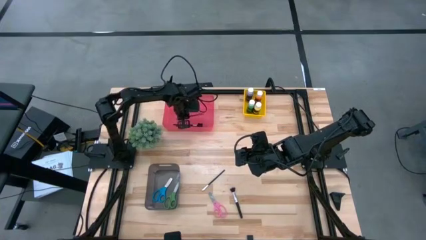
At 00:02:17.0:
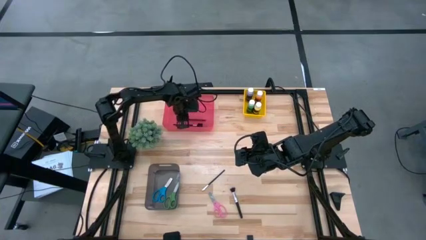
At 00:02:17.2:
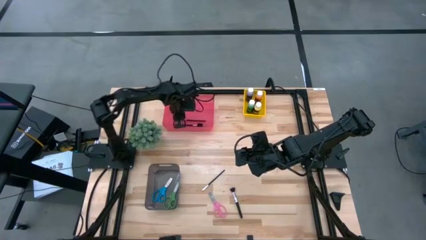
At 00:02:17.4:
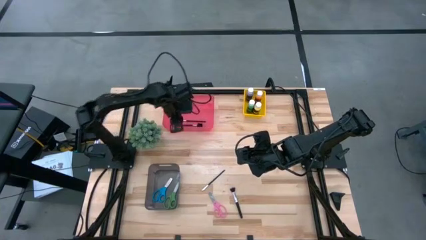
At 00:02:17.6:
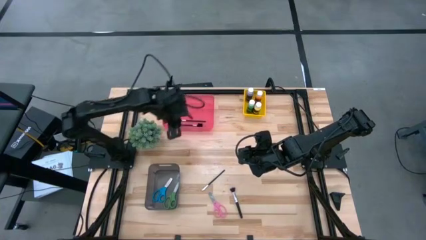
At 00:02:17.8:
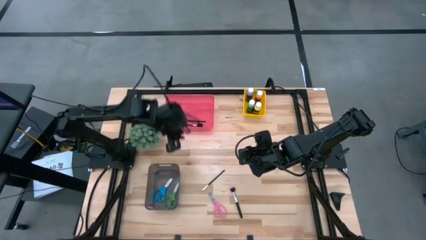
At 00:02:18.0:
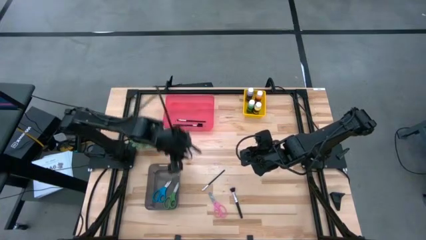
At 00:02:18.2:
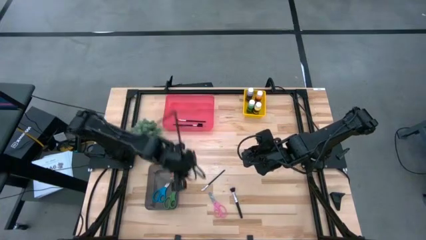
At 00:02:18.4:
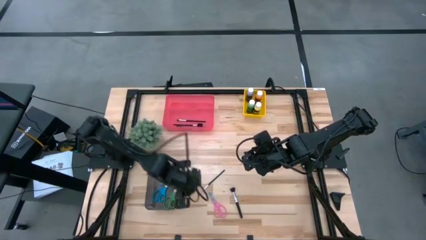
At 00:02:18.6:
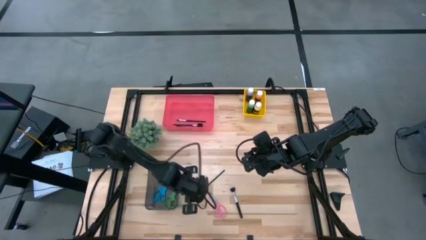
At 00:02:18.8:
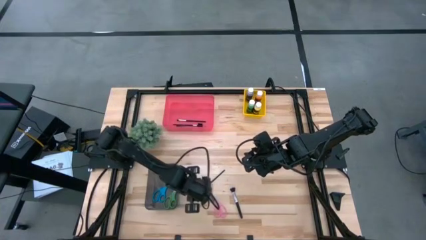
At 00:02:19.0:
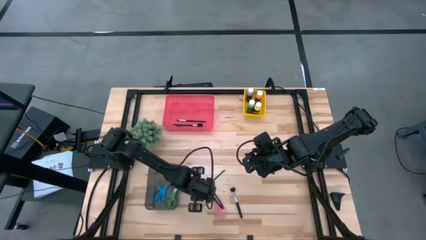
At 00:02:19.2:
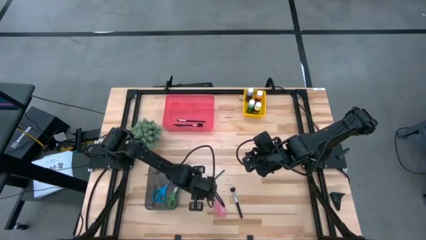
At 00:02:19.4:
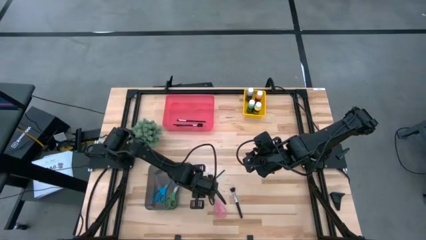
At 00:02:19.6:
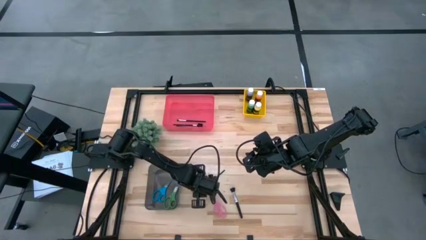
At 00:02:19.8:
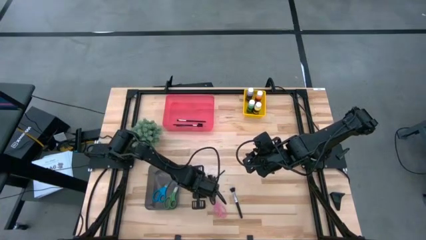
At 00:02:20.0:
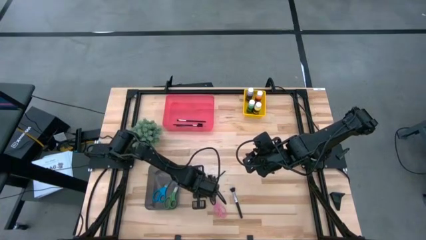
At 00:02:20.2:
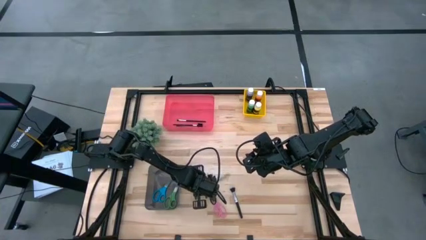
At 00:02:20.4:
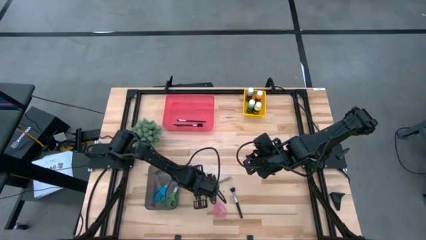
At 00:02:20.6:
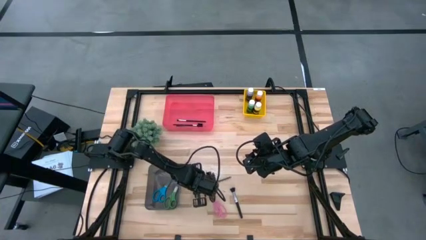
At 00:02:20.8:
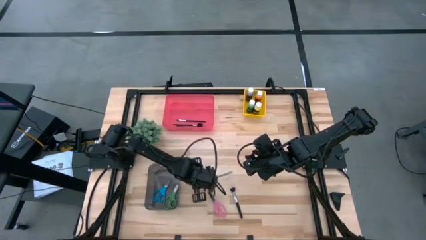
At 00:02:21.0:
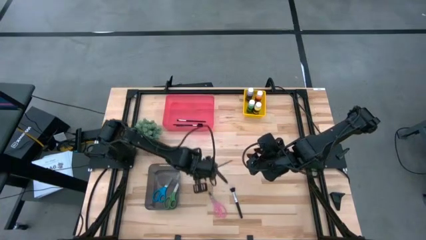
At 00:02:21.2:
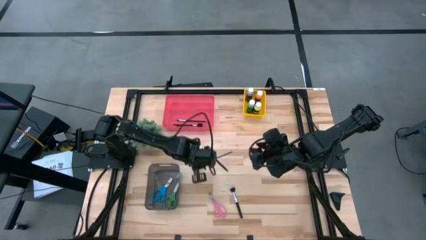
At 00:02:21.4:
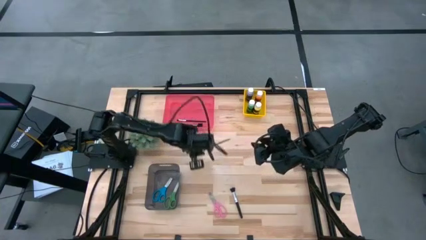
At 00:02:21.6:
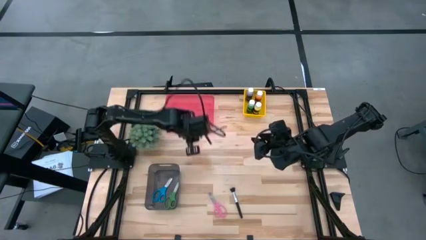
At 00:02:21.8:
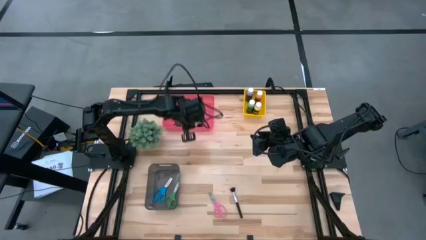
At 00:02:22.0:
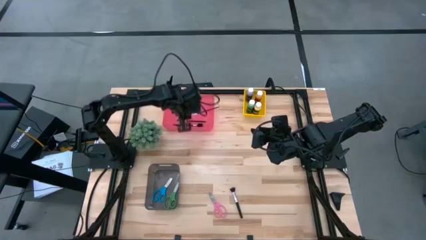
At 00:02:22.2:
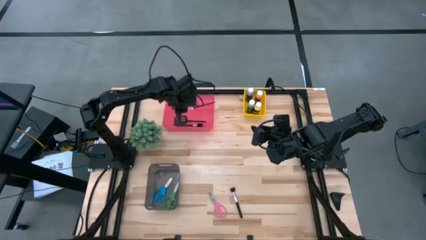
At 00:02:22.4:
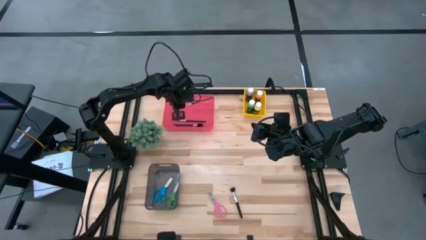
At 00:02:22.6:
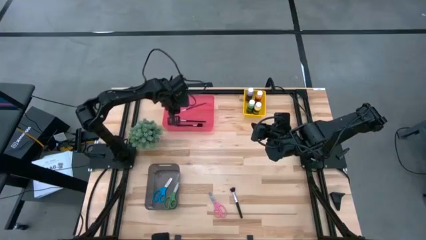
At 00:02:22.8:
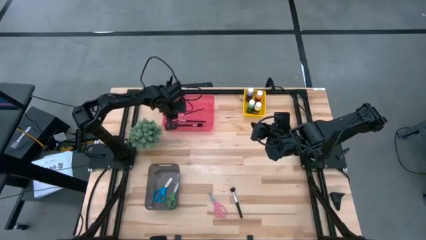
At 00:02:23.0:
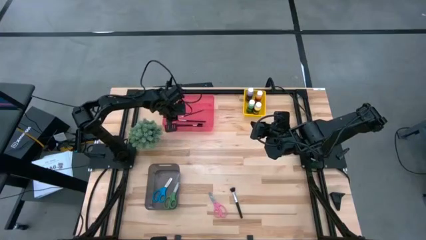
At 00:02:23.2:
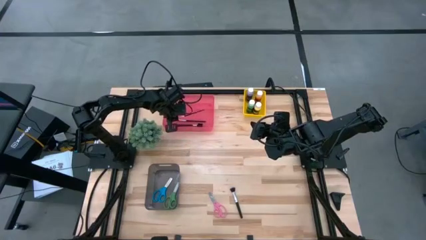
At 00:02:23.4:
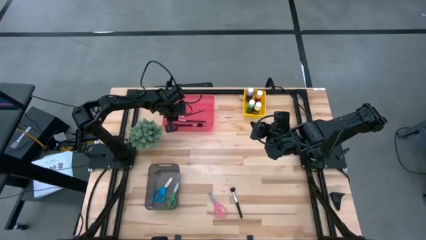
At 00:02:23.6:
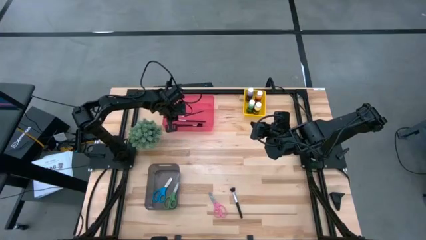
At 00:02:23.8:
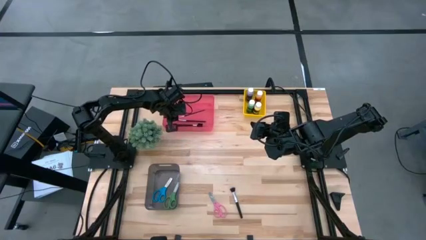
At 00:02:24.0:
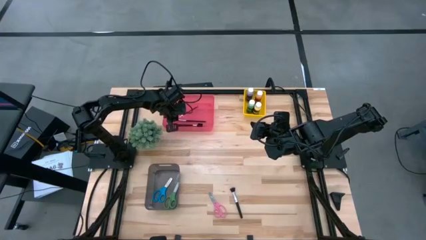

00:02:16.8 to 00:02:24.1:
Task: Pick & Place Paint Supplies
Put the eyeshadow brush into the red bin

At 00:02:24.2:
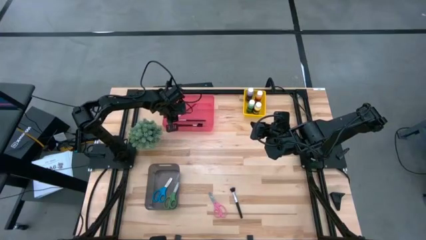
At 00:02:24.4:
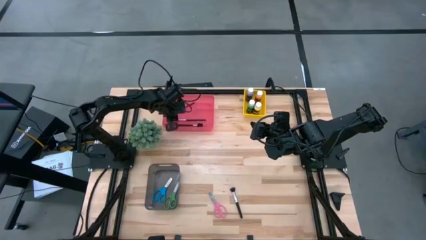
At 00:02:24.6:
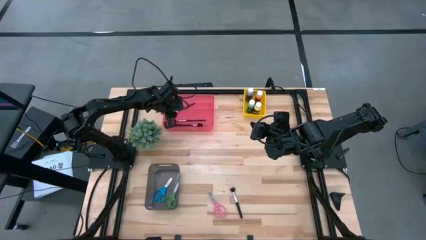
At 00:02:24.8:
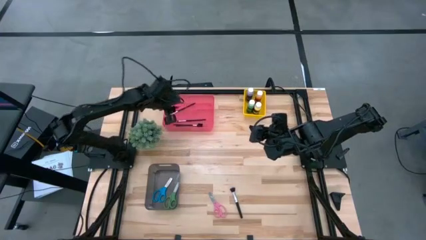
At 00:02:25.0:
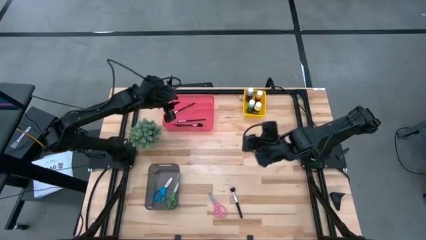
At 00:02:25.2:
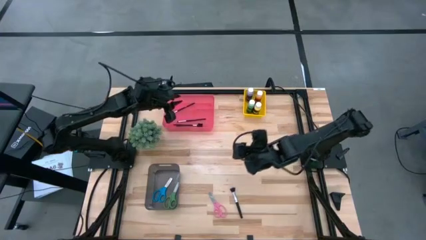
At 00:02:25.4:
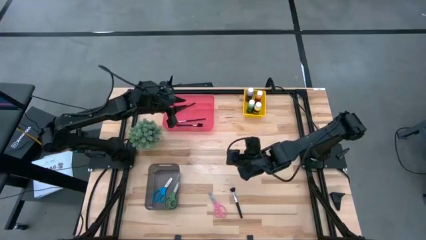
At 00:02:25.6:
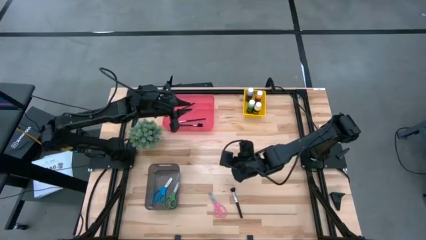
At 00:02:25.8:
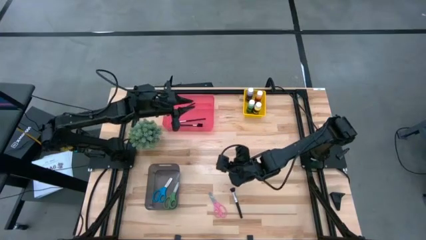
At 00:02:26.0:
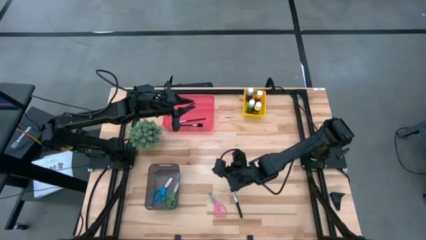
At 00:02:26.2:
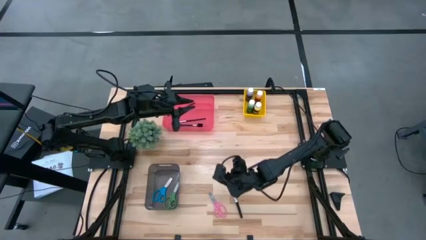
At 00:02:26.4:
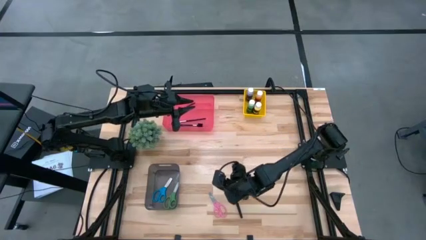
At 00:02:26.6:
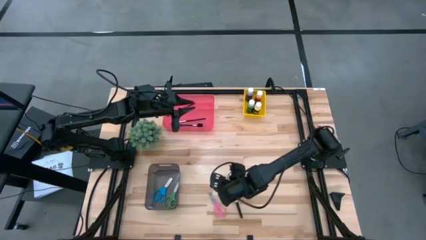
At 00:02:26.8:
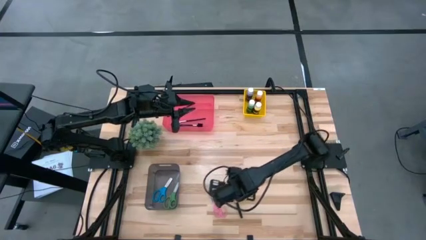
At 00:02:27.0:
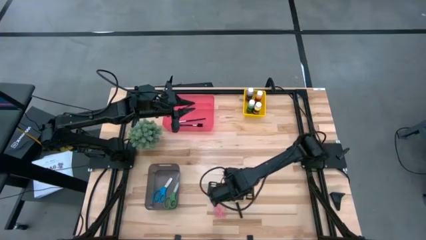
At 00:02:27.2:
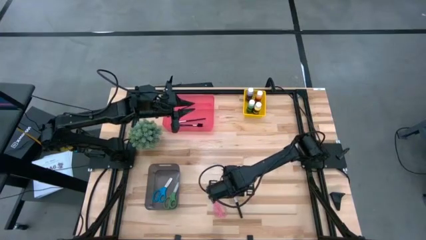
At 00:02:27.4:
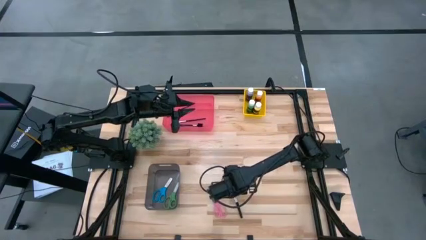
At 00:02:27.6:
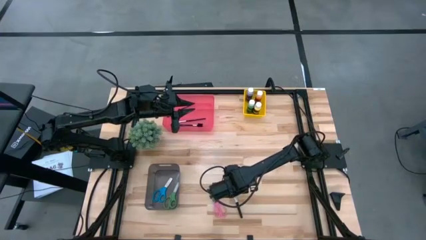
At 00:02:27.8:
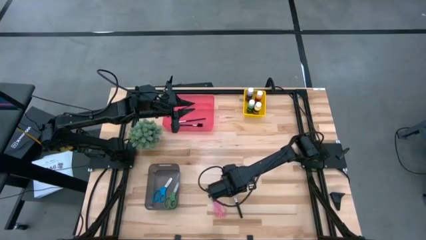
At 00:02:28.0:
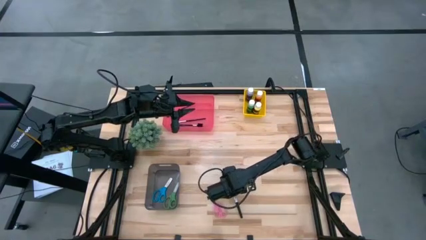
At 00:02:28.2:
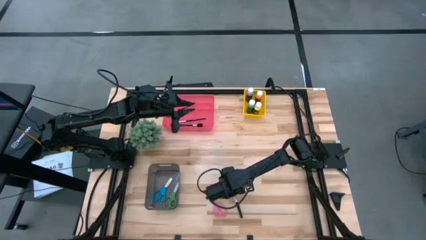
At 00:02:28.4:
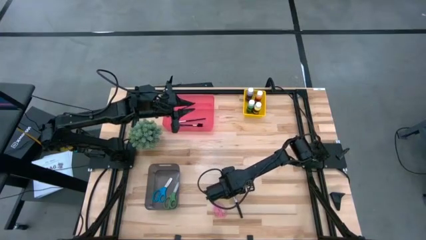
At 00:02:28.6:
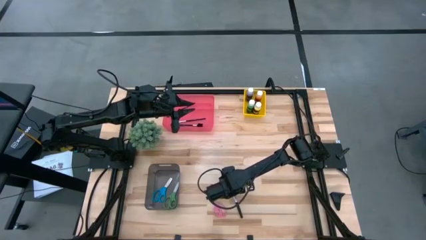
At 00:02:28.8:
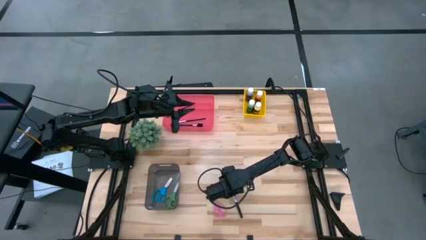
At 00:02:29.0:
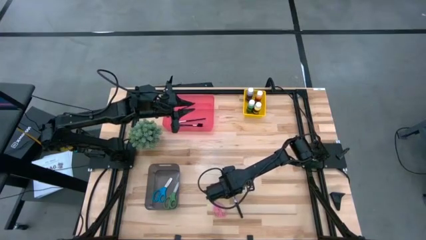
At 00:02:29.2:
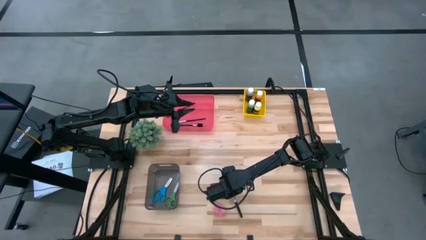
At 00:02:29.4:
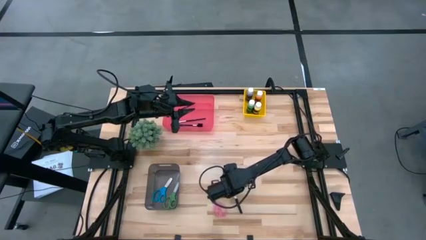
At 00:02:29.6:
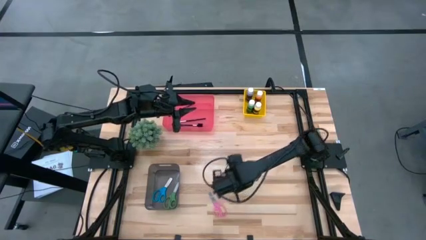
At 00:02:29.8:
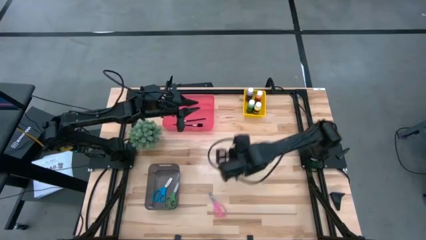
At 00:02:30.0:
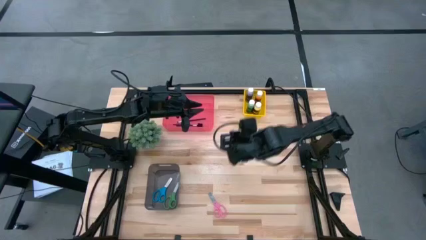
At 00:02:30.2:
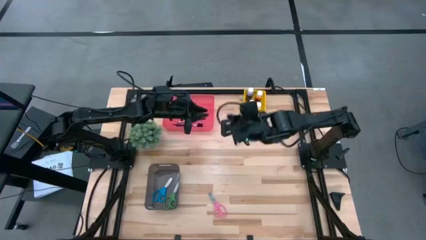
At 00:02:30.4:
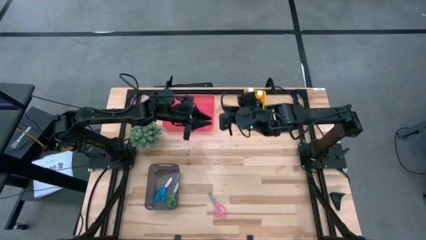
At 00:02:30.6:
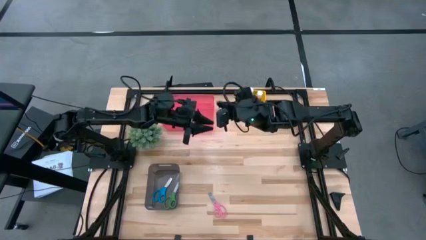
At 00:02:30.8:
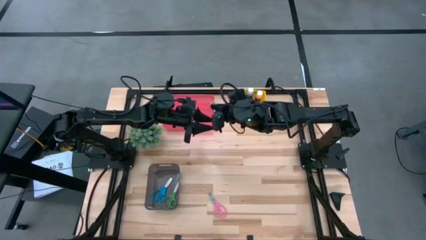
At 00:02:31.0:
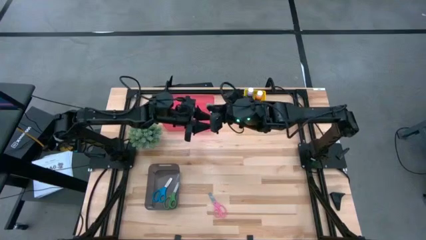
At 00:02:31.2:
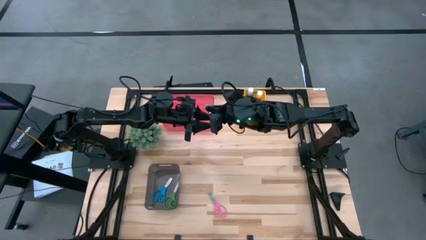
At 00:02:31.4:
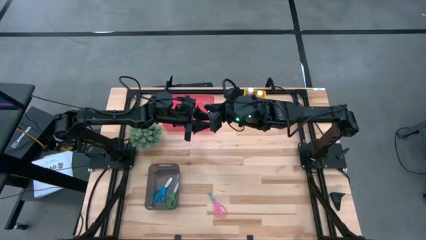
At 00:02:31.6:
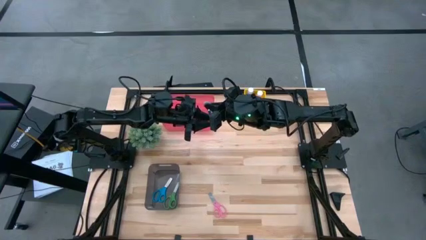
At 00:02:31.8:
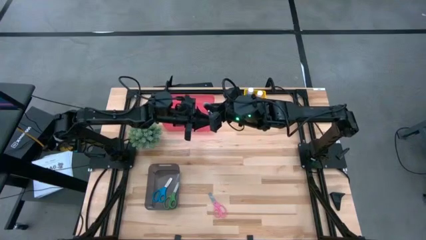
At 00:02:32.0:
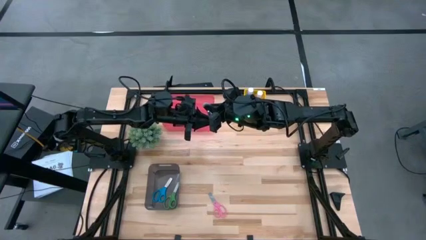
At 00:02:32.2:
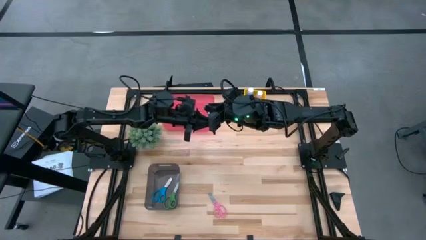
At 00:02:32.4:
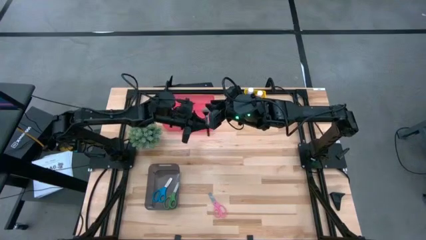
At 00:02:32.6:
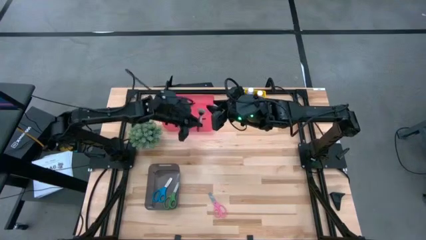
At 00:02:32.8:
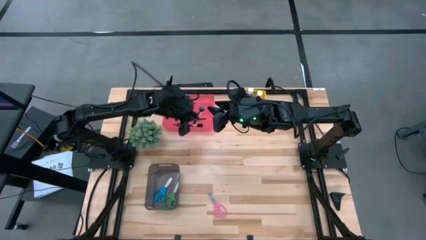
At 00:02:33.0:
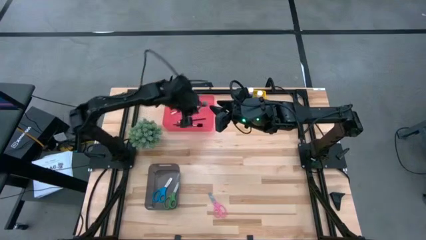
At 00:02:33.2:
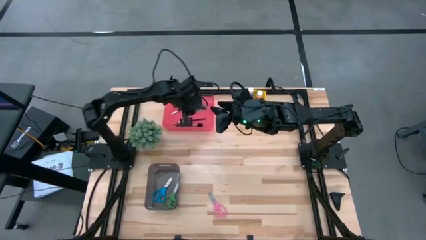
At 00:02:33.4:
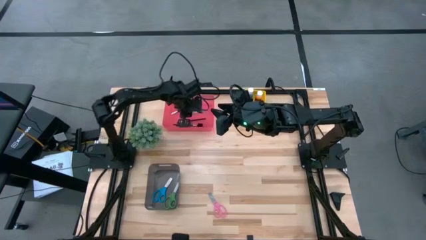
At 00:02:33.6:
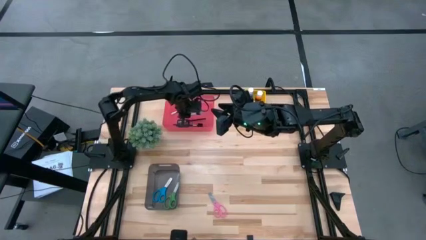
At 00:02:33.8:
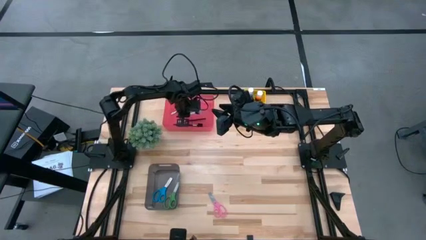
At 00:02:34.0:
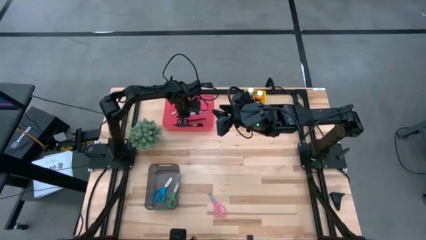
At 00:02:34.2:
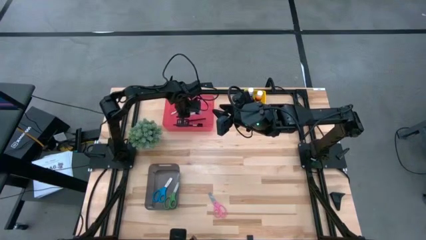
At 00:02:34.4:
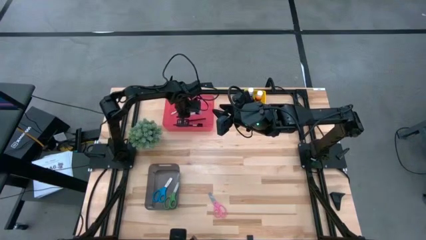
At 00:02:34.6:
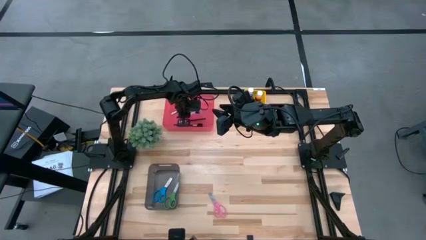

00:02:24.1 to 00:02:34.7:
Put the powder brush into the red bin
